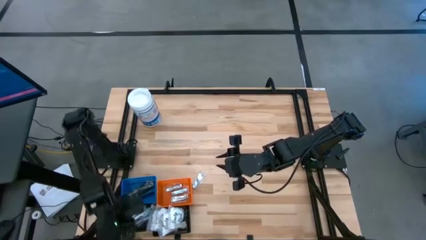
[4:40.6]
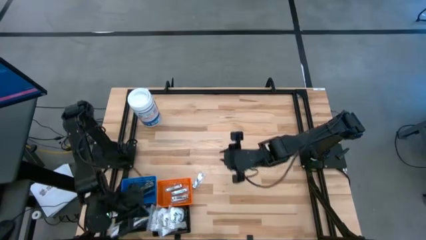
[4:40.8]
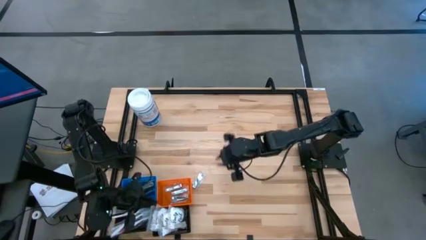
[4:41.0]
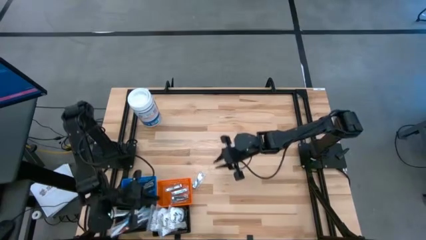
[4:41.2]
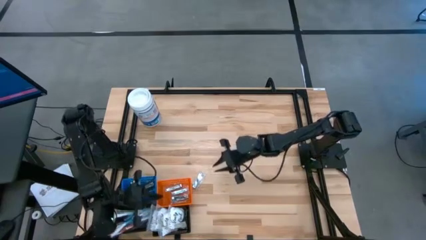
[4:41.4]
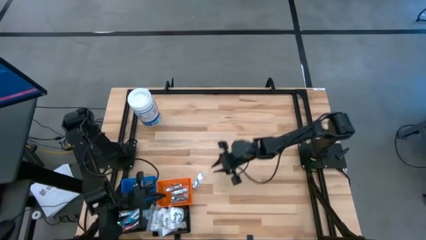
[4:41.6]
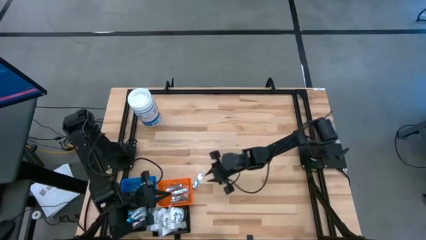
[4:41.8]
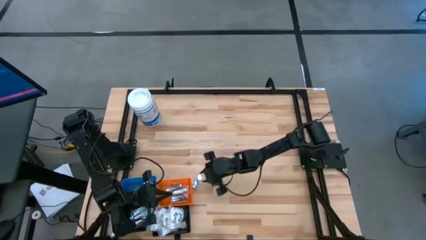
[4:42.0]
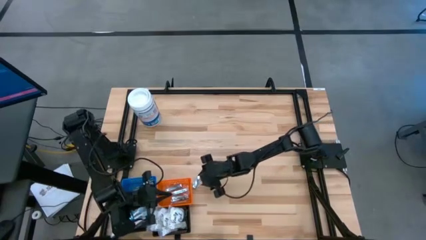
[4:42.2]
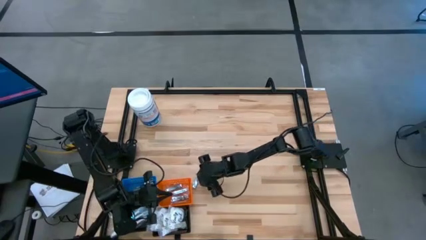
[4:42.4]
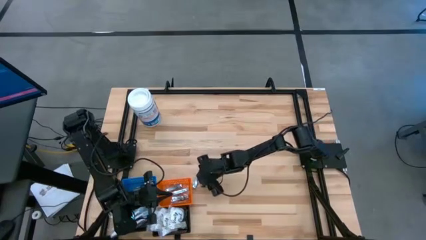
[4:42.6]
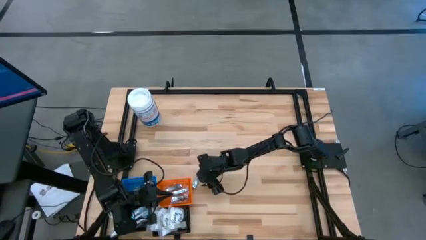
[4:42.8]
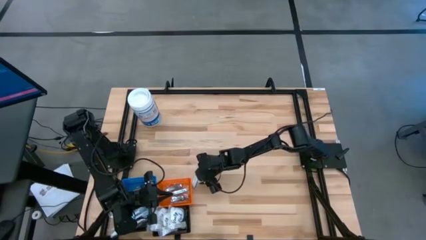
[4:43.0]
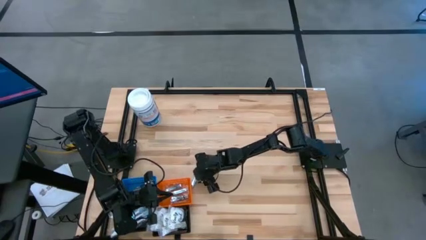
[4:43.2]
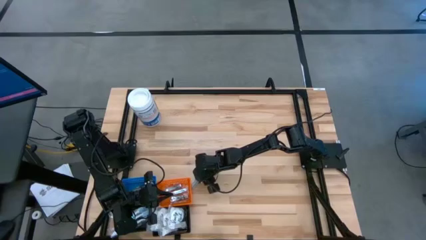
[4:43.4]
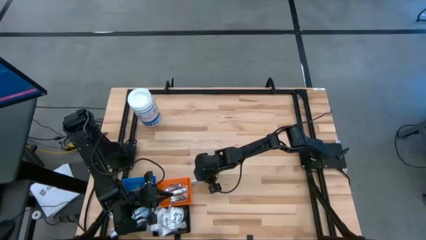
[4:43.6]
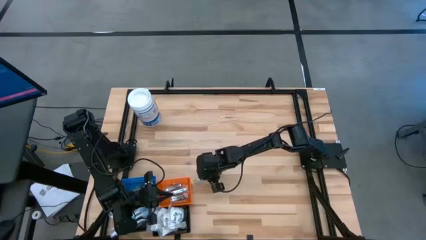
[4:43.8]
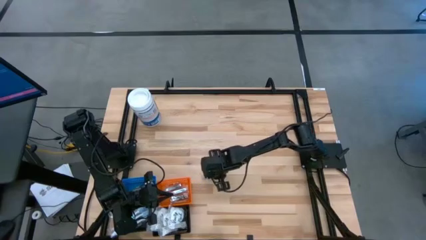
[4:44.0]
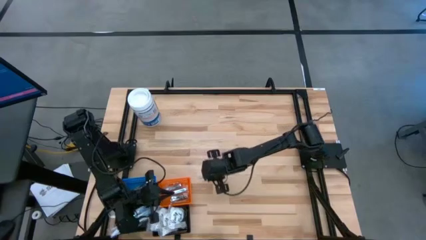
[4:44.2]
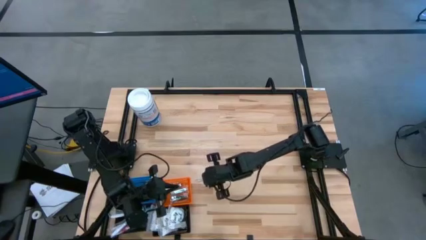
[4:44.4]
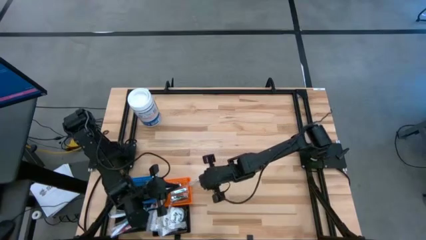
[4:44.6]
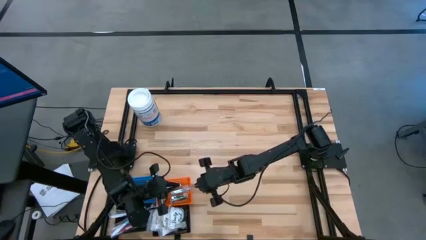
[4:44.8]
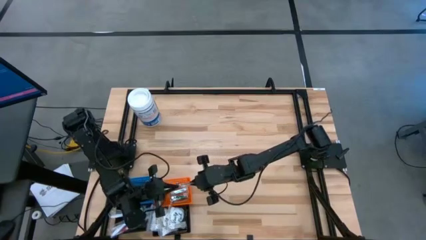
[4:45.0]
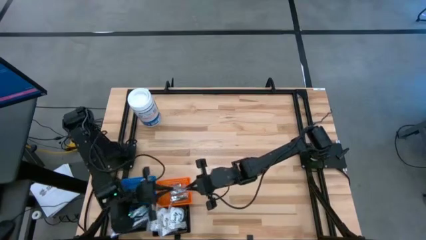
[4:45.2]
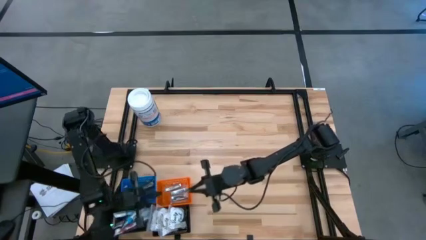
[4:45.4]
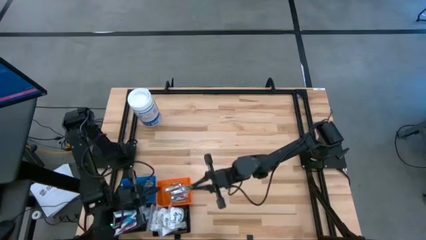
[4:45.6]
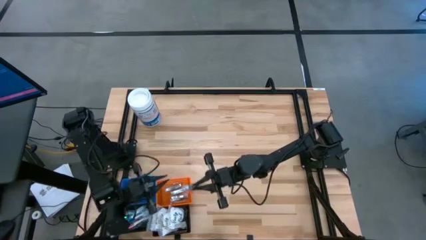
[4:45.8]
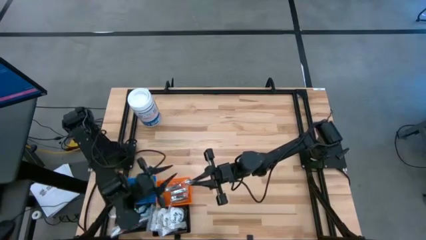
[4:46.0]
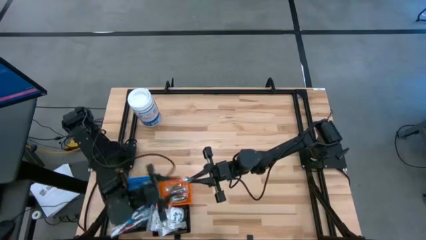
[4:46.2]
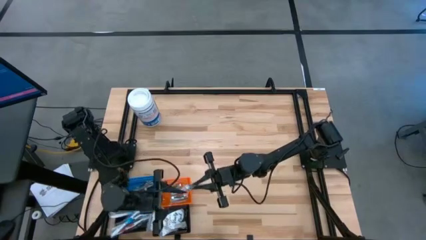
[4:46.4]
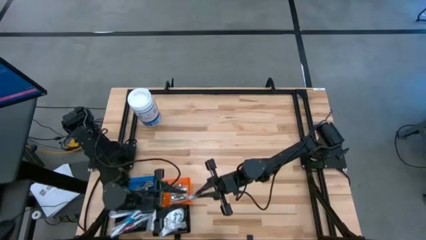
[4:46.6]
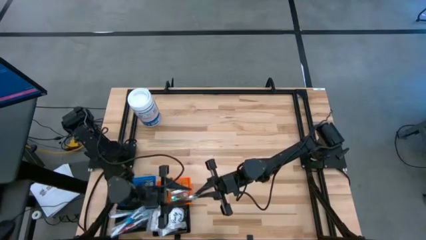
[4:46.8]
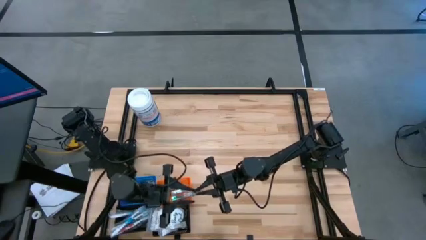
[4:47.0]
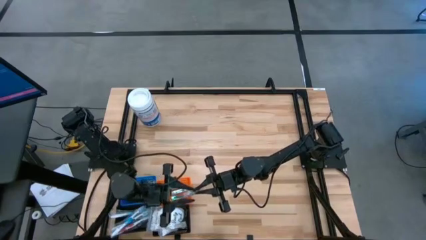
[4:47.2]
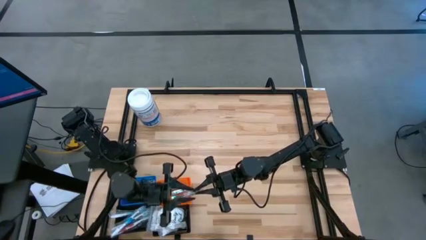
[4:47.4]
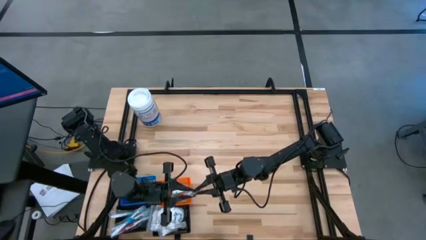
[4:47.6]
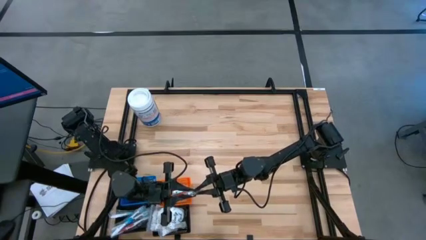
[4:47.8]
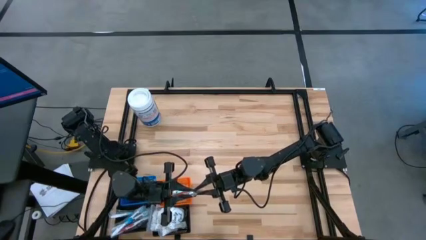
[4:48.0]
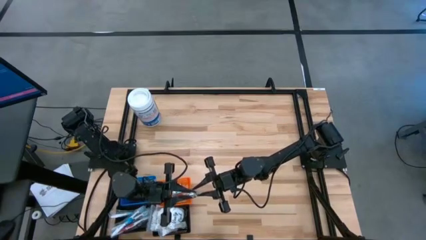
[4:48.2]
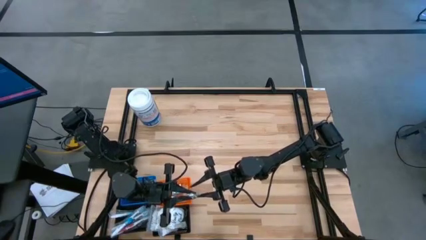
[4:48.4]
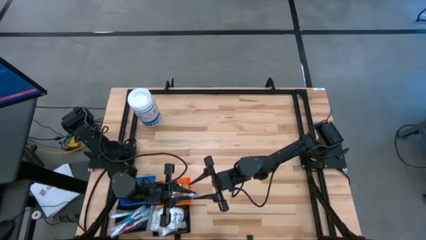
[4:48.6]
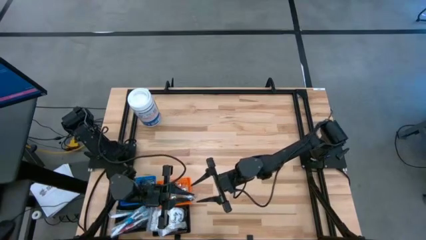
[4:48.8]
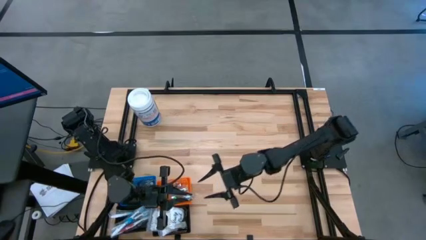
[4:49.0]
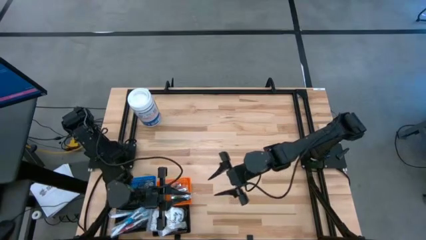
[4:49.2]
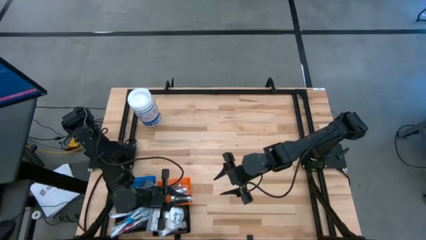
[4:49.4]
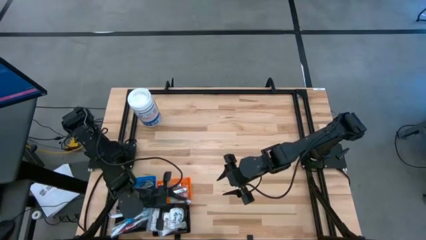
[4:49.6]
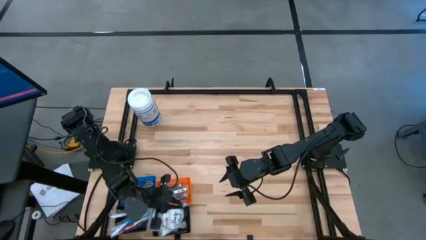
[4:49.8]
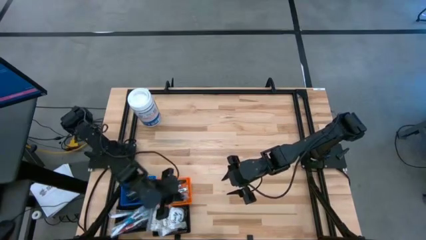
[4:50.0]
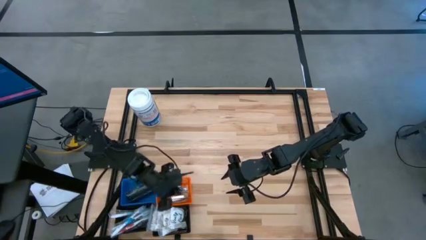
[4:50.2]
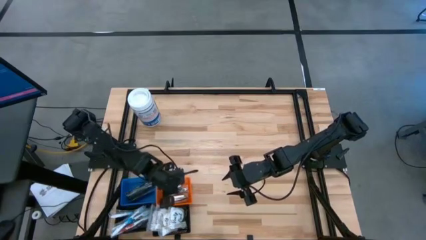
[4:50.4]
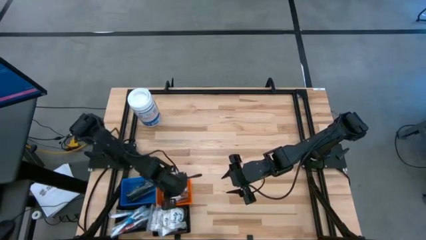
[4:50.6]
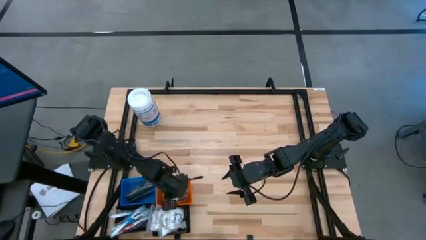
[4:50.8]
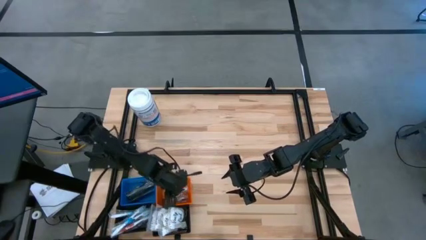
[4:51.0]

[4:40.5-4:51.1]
Task: Pick & Place Travel size toiletries
Put the nail cutter into the orange basket

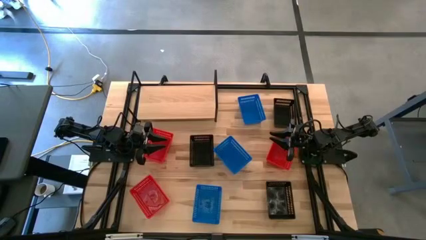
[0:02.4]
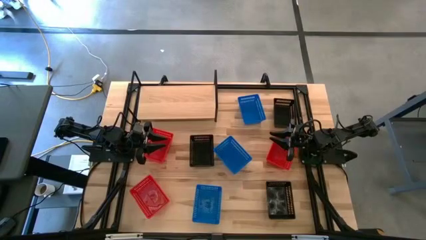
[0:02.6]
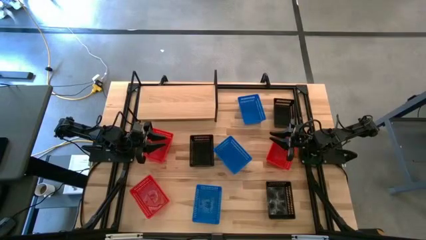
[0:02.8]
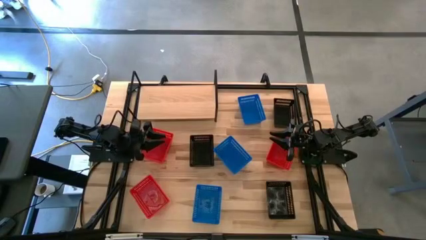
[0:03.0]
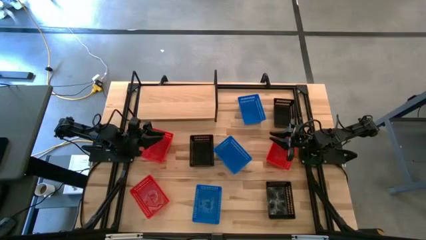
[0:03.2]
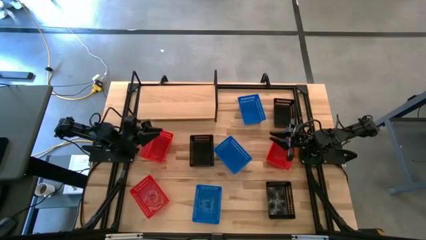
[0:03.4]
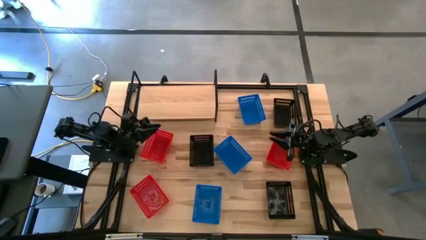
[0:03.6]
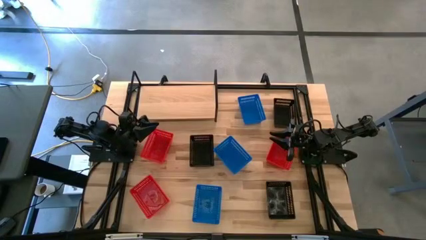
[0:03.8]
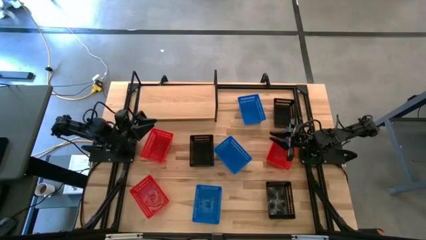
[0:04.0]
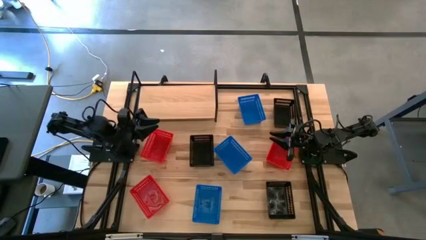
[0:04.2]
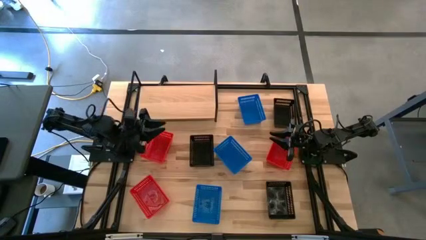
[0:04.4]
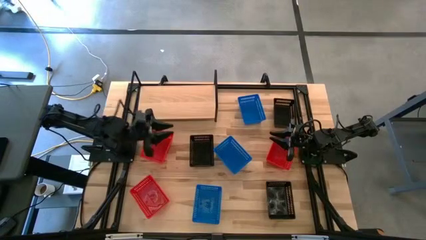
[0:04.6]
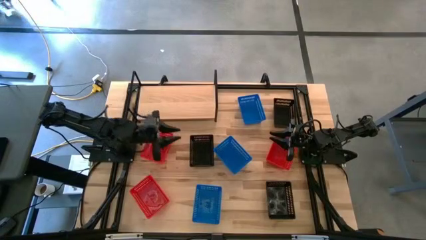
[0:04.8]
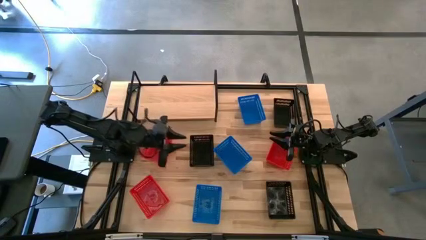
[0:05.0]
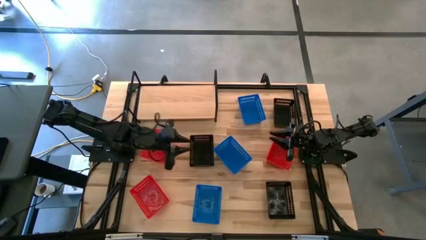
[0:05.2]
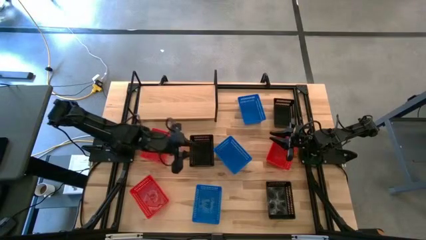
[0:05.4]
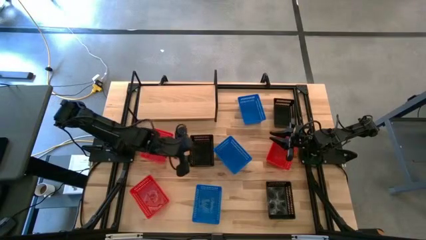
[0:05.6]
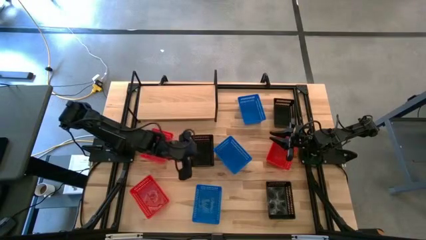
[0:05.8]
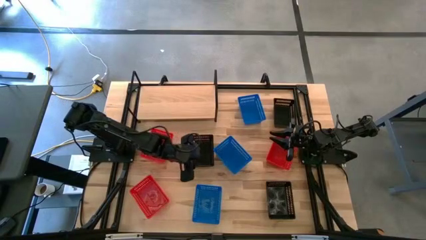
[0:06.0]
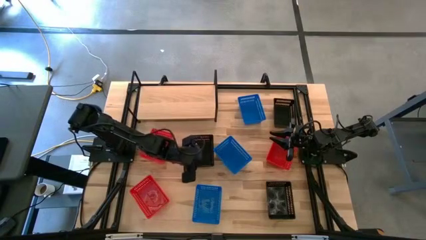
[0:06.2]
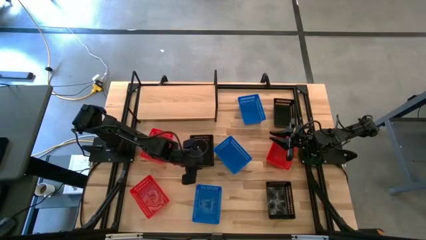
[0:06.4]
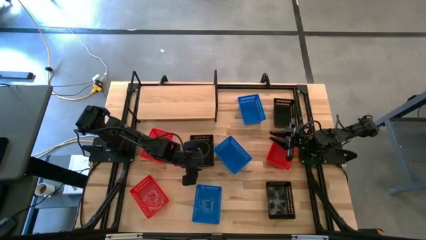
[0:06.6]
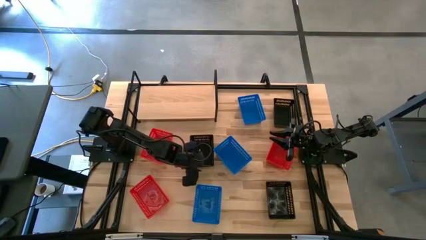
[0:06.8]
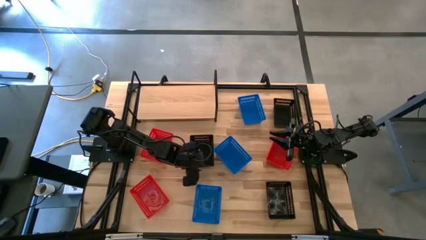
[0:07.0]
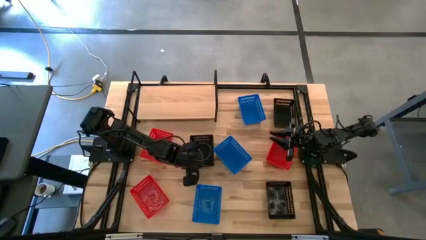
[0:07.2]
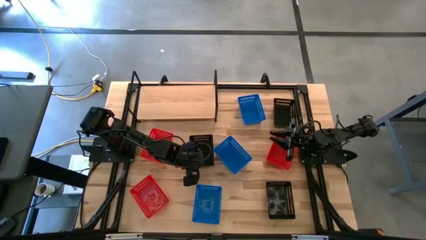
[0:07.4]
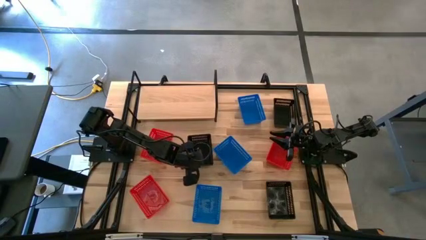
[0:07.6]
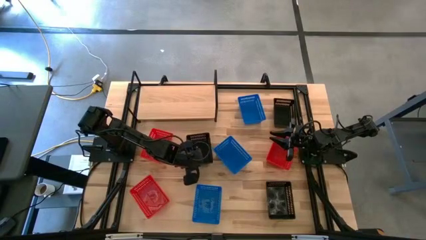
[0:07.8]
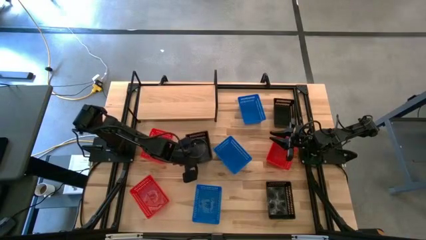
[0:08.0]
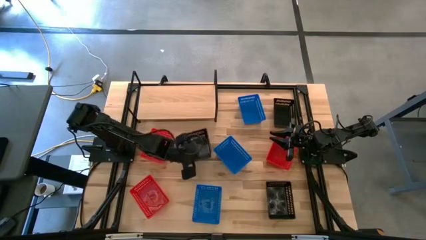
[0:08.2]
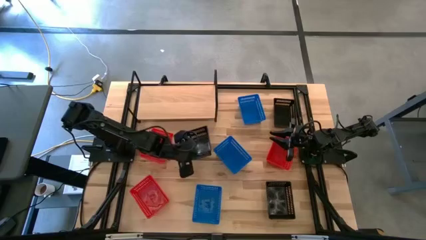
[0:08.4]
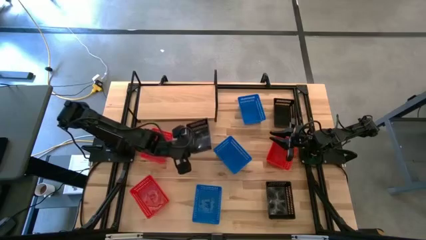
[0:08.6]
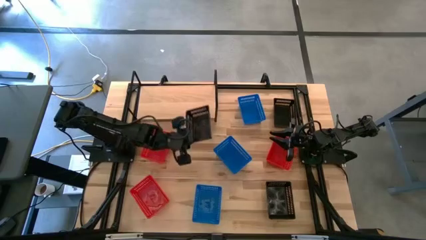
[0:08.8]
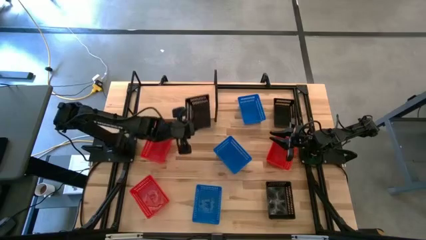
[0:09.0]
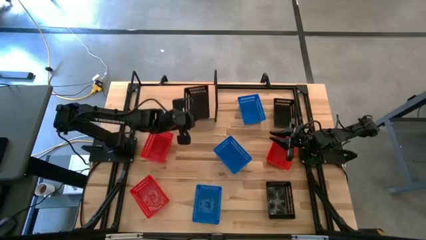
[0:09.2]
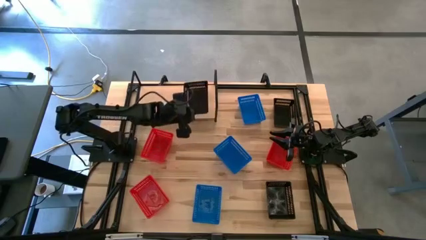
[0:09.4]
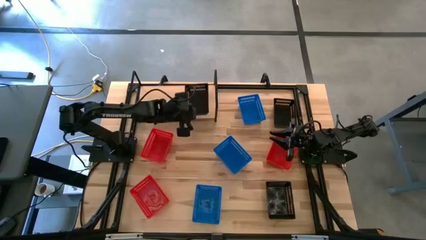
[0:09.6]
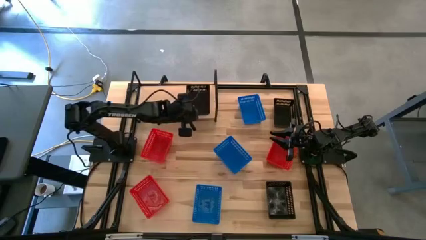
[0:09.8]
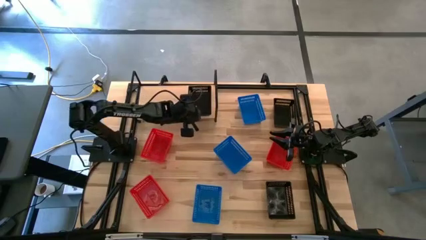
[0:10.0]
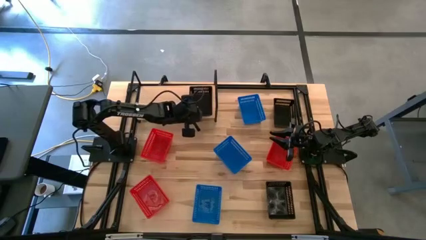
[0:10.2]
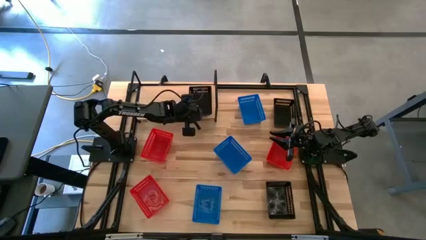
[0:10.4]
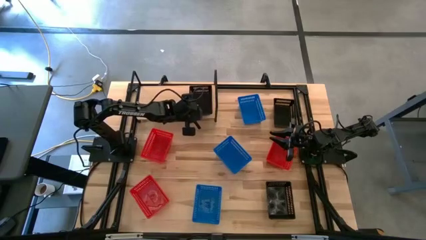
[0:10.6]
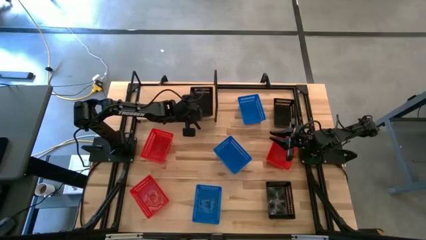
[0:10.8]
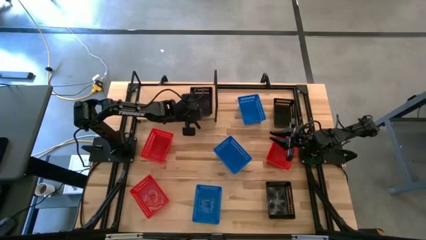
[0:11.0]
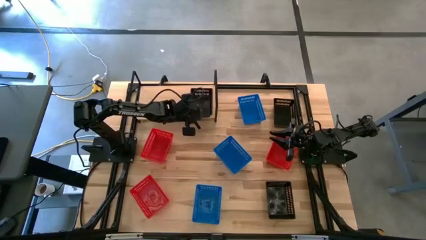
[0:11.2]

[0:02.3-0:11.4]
Task: Stack baskets on shelf by color
Put the middle left black bin on the shelf
